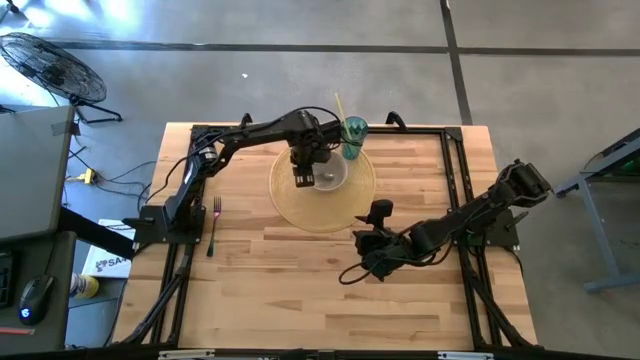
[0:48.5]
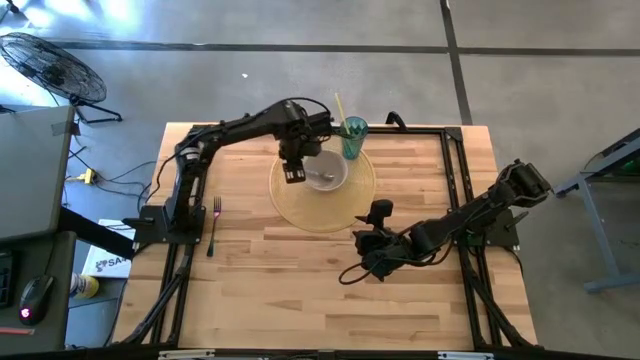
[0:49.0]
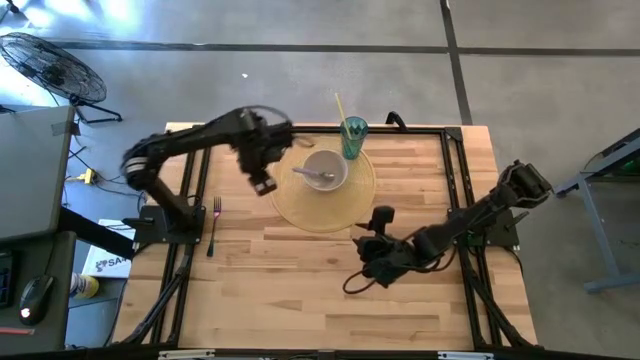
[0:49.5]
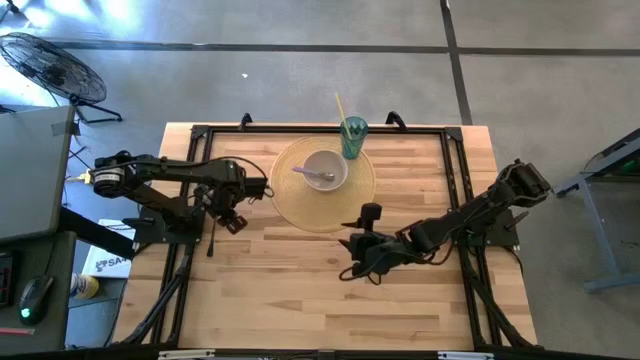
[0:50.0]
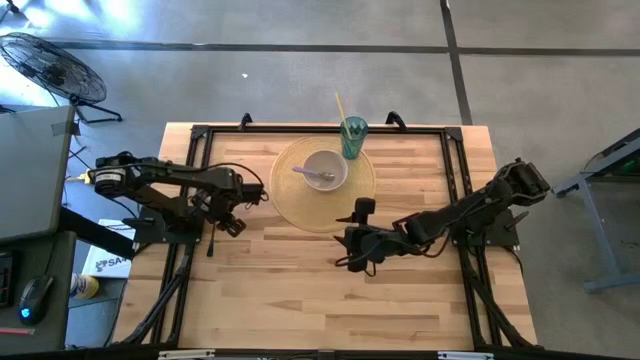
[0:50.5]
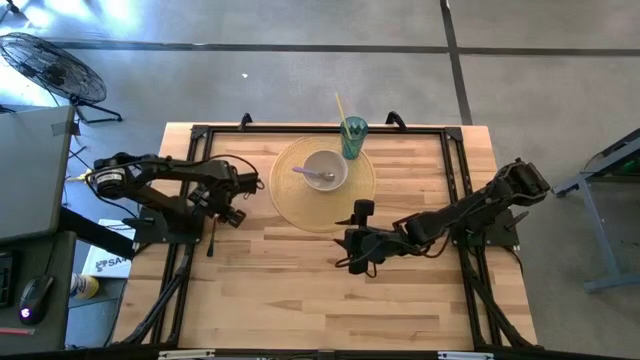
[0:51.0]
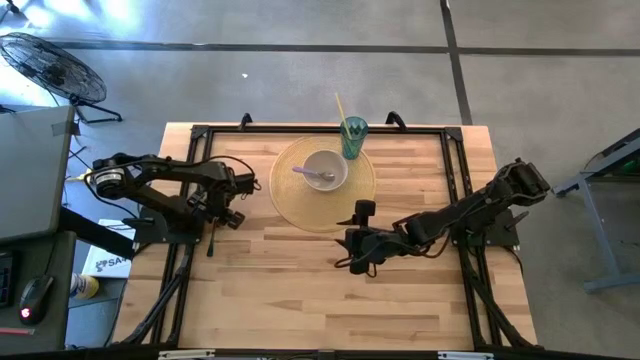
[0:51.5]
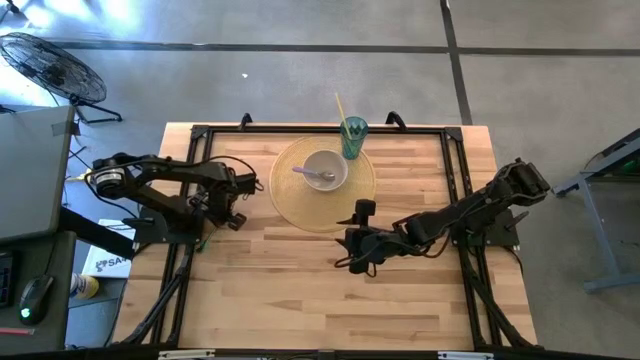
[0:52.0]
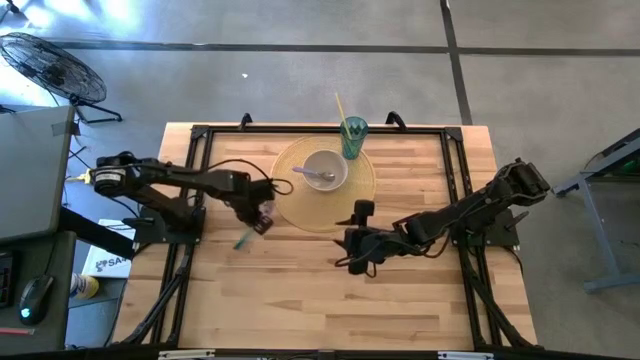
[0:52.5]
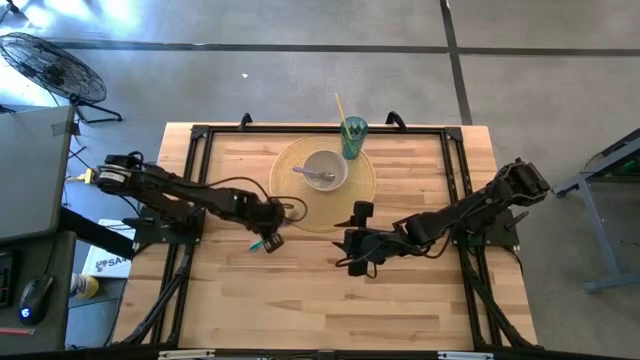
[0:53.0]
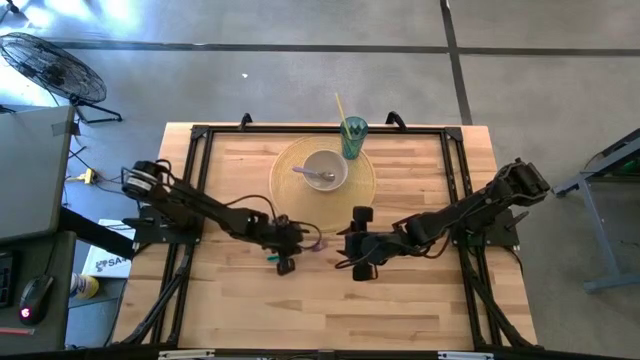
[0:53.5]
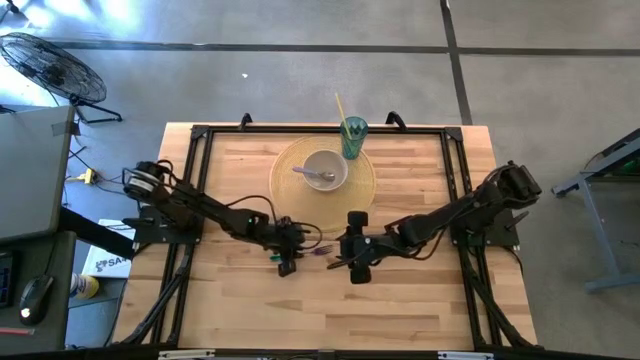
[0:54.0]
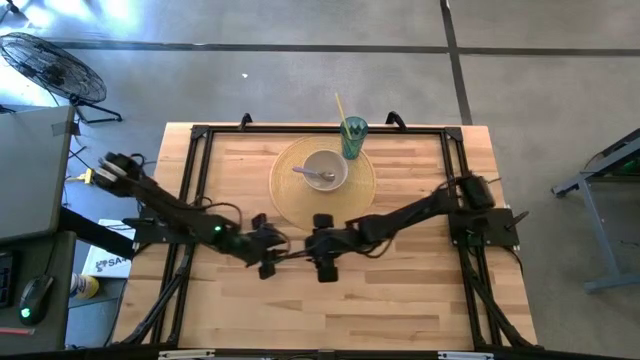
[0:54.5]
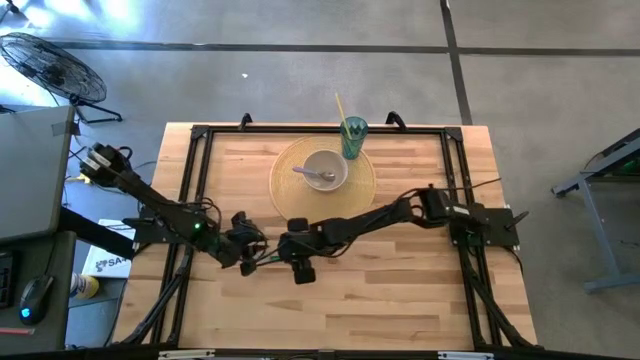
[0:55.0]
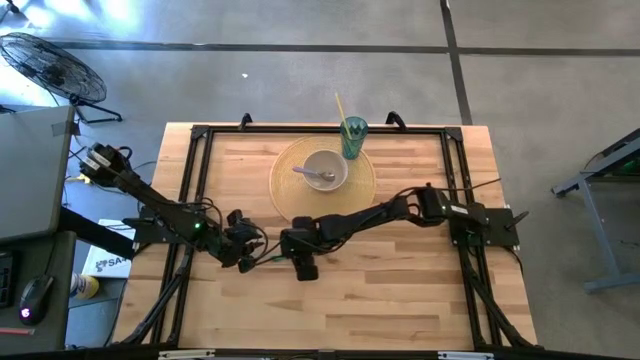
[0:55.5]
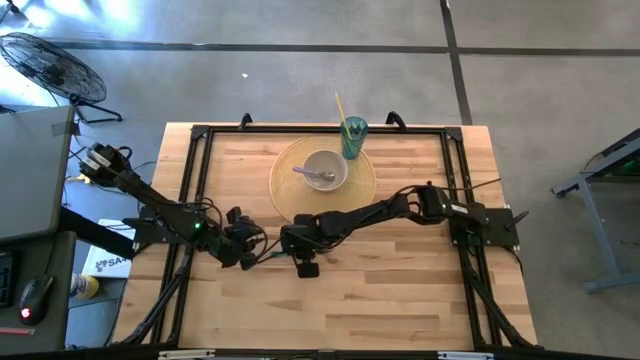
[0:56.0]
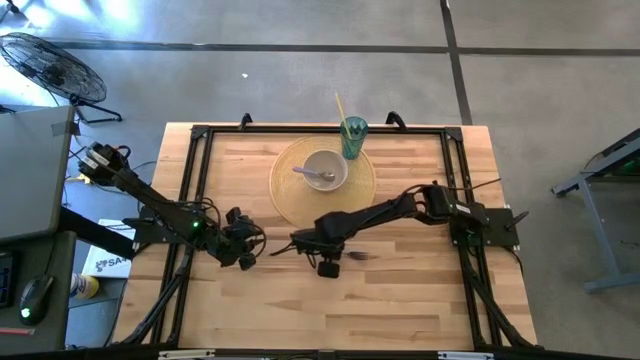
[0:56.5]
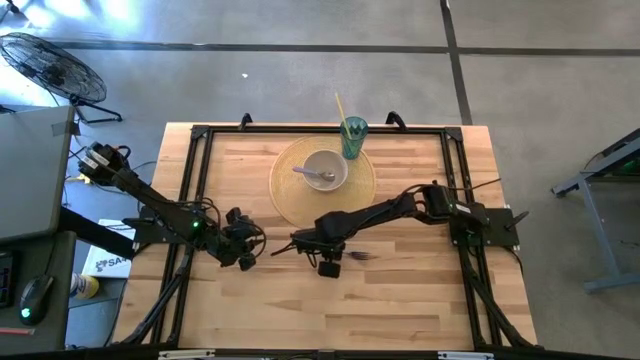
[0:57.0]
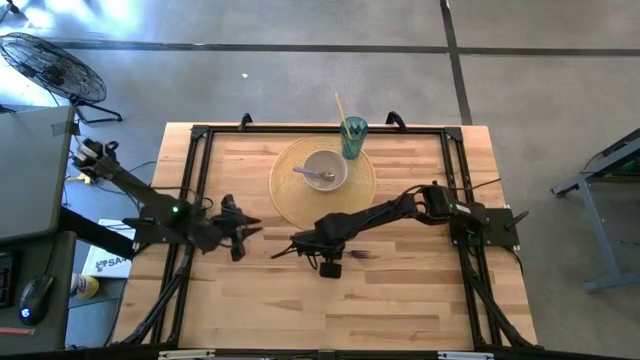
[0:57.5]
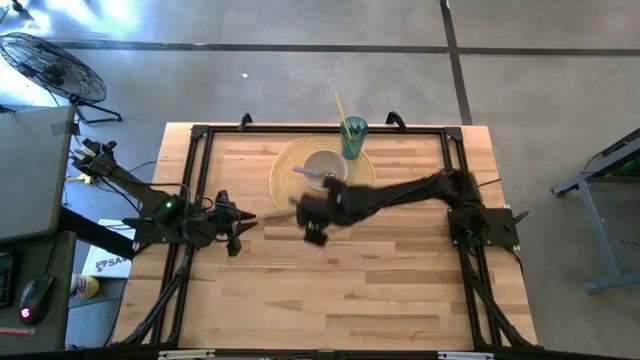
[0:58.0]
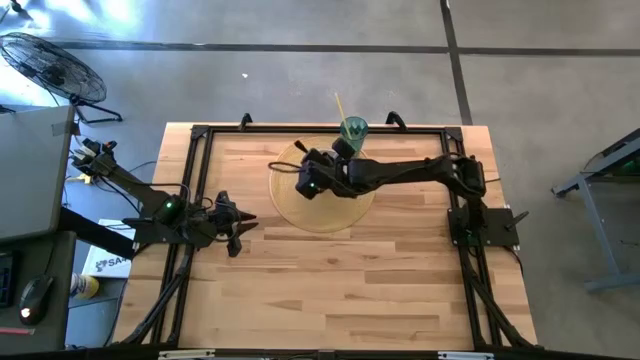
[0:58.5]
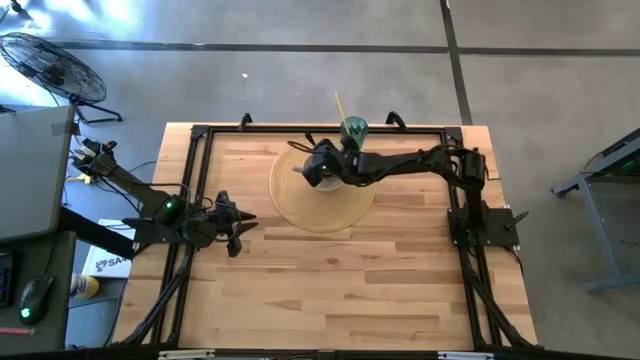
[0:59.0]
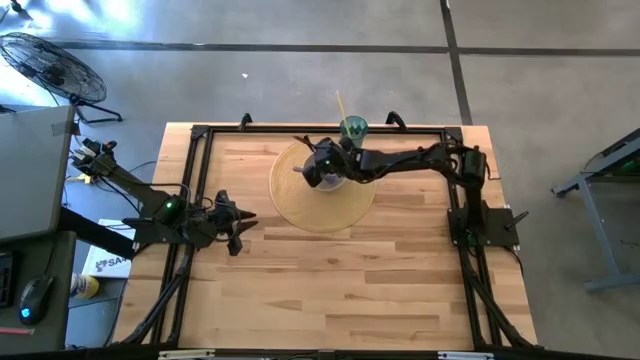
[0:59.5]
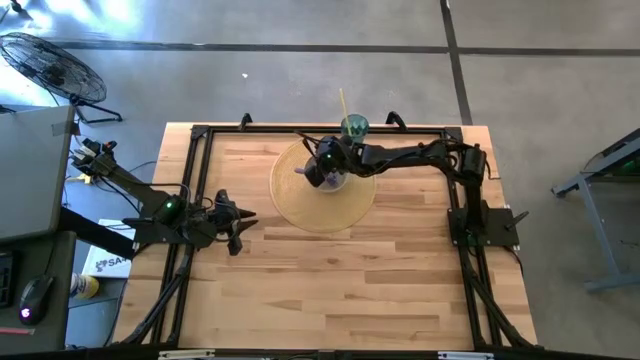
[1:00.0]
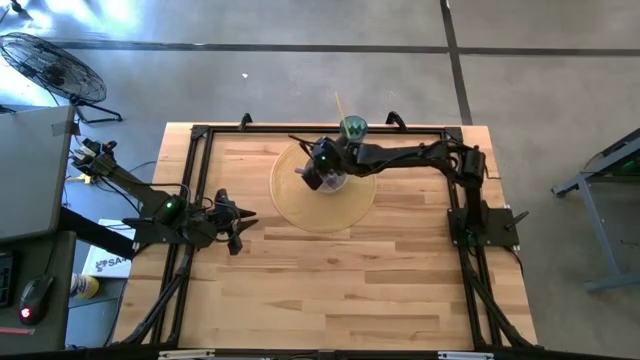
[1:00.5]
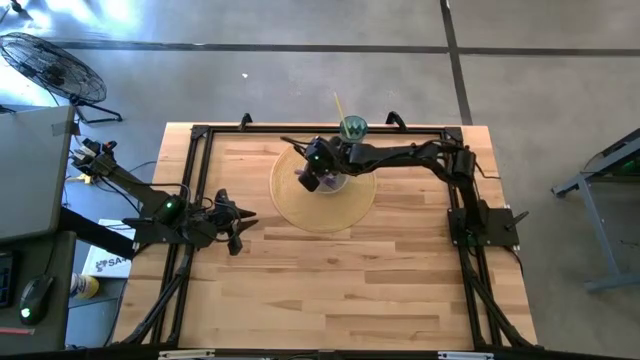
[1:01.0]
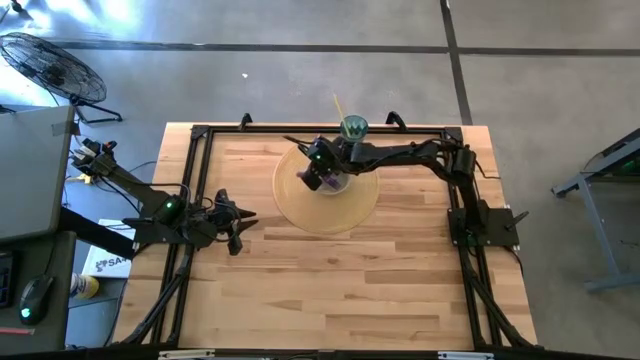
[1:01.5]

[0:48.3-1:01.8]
Task: Pick & Place Utensil
Put the blue fork into the white bowl on the brown mat

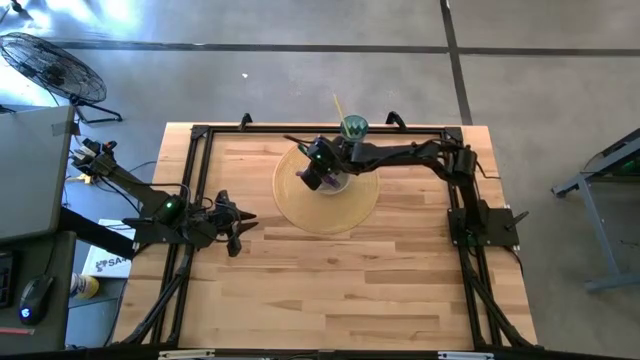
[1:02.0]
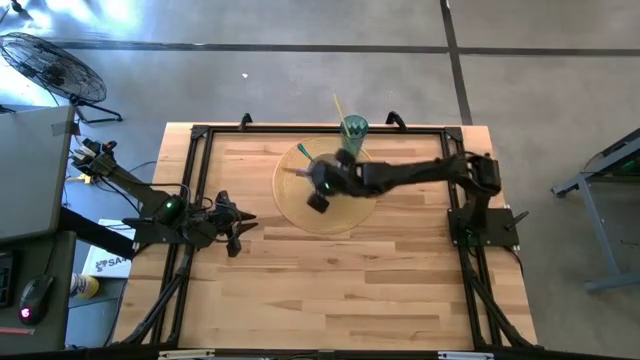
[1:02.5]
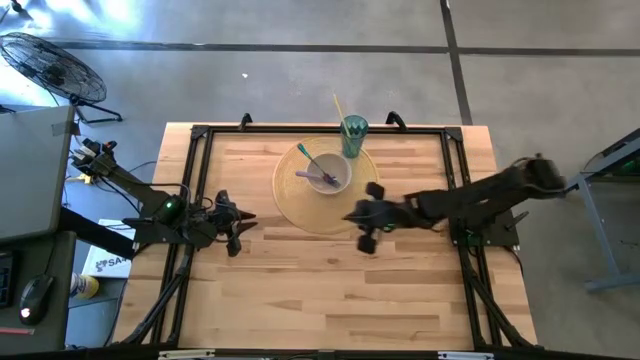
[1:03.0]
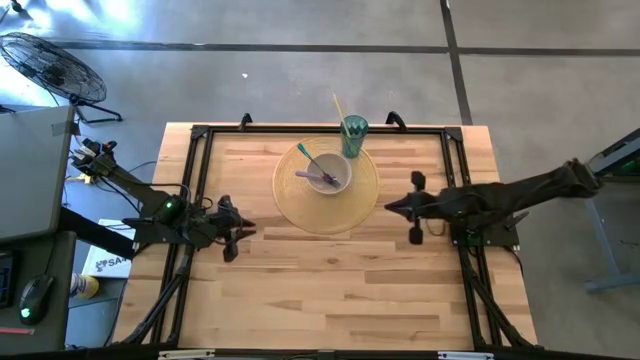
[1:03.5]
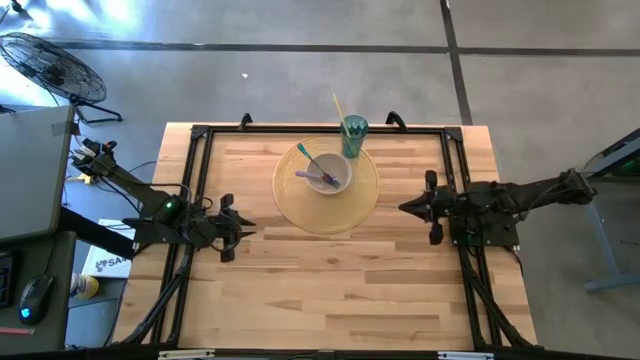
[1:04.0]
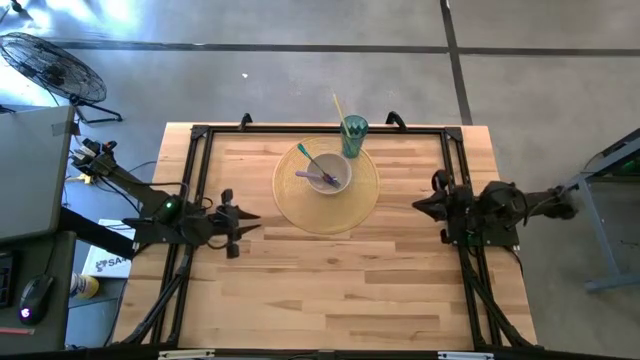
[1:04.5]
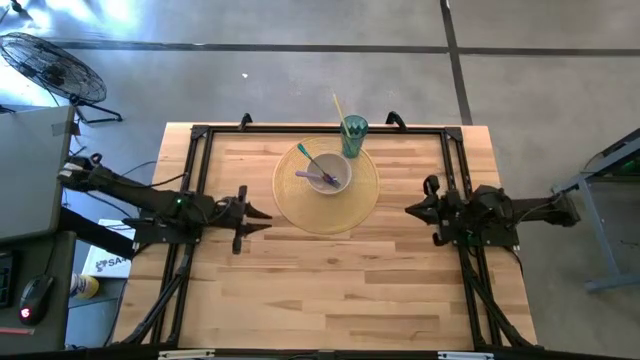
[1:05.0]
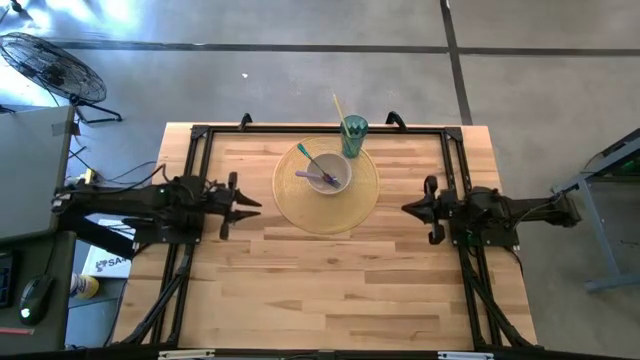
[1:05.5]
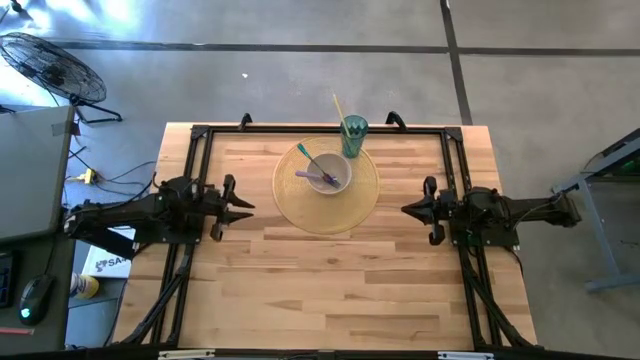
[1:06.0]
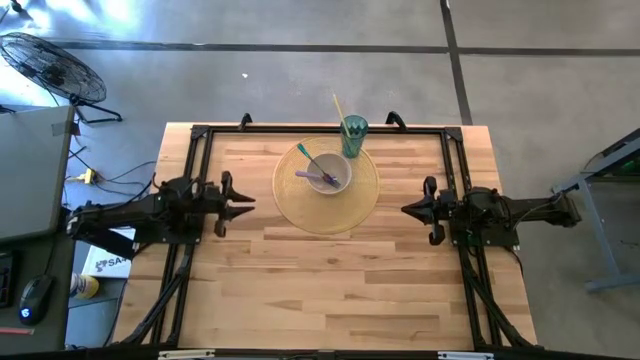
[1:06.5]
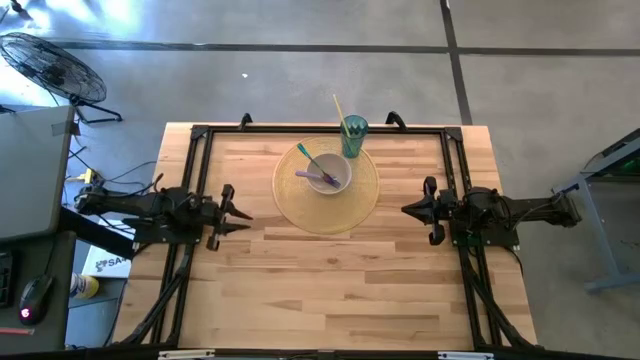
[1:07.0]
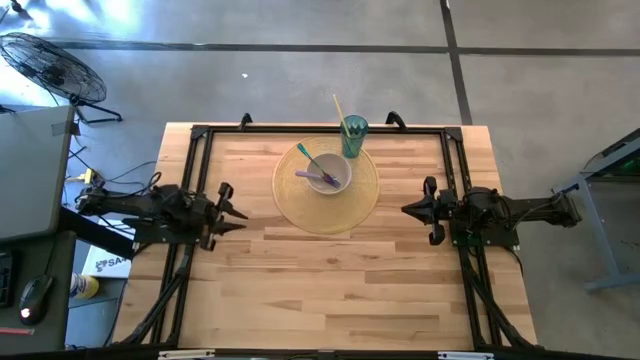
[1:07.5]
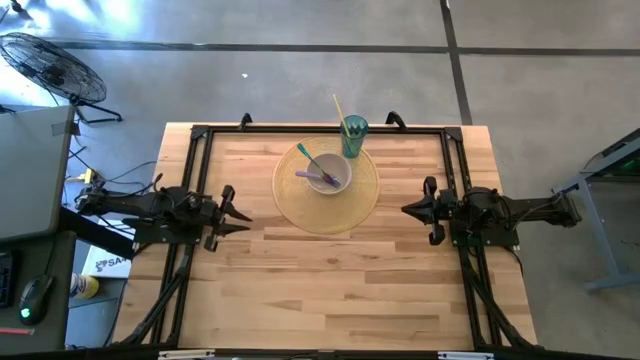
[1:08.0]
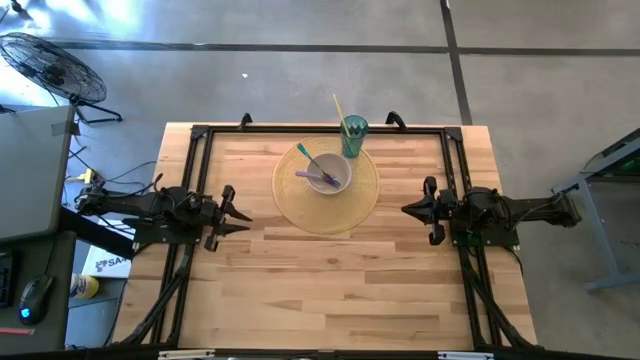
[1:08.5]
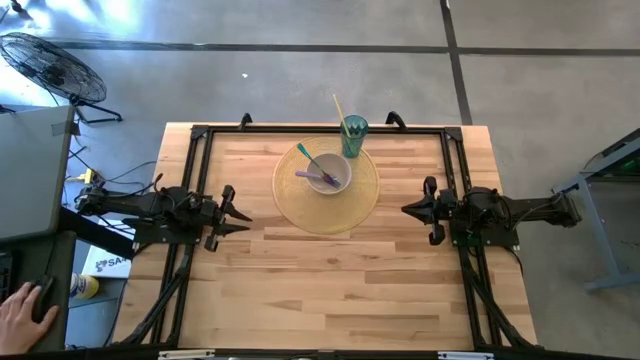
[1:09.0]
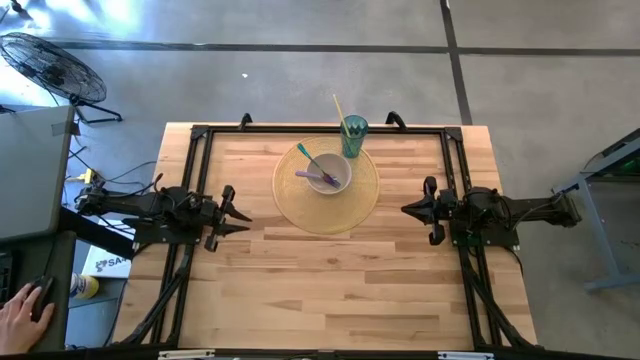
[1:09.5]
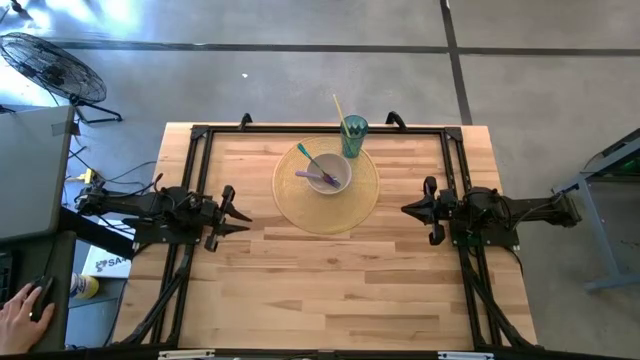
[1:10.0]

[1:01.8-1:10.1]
Return to Home Position

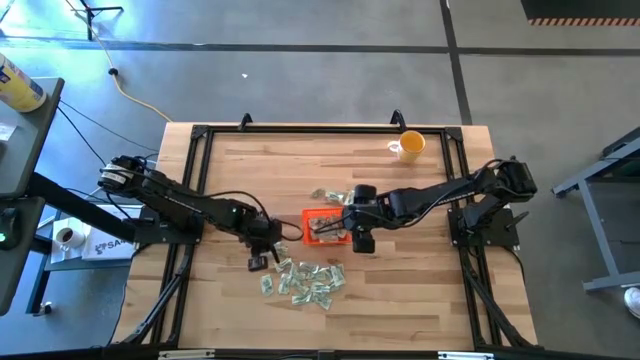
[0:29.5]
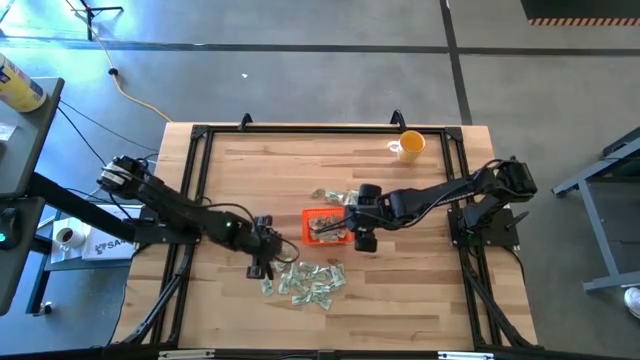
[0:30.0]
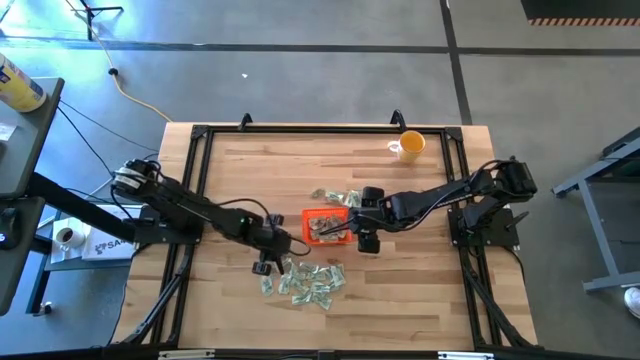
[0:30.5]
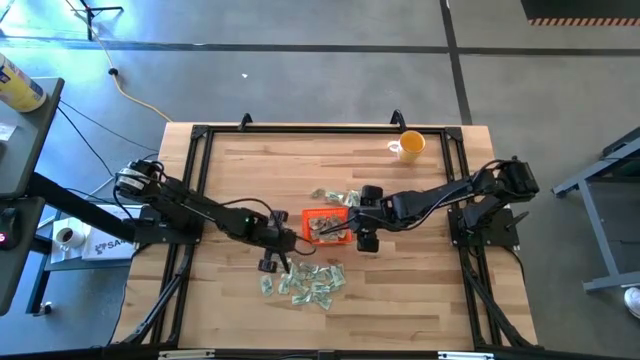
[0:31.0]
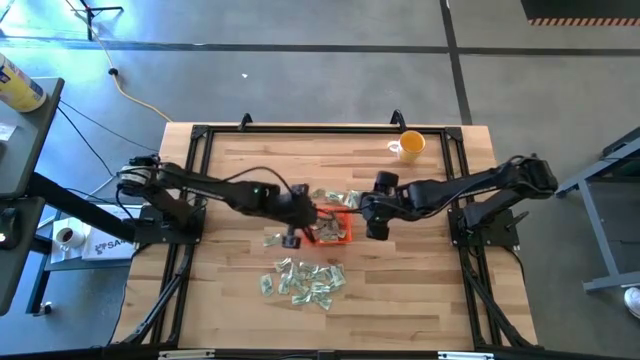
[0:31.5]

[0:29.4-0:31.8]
Task: Pick and place Stevia / Truvia into bins
Put the stevia packet into the orange bin
